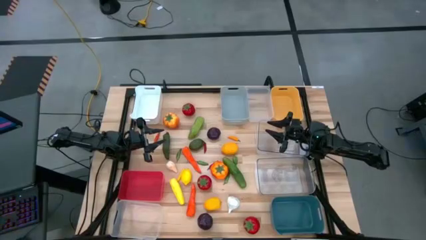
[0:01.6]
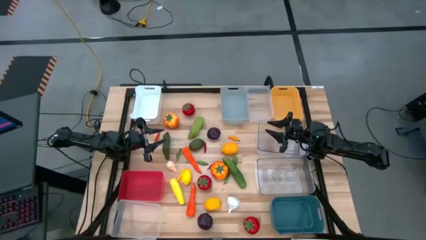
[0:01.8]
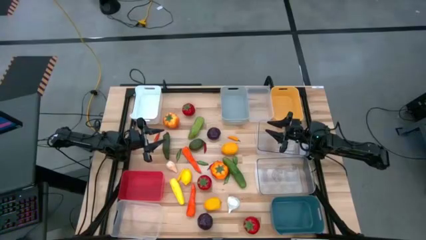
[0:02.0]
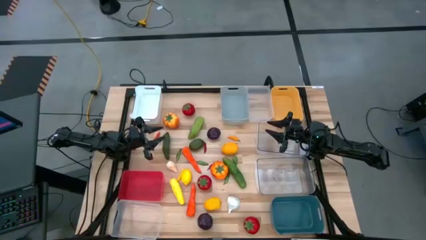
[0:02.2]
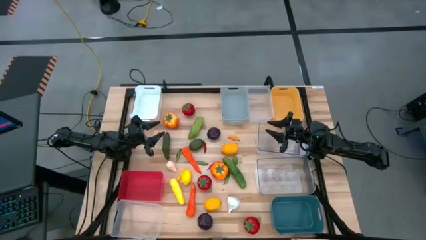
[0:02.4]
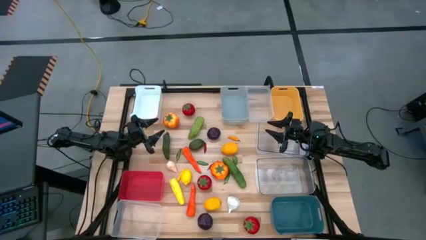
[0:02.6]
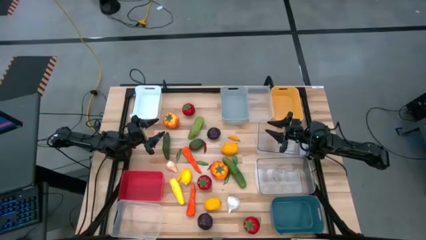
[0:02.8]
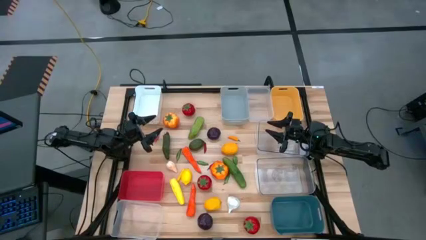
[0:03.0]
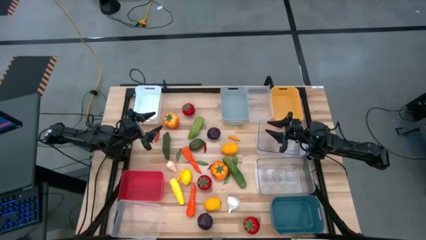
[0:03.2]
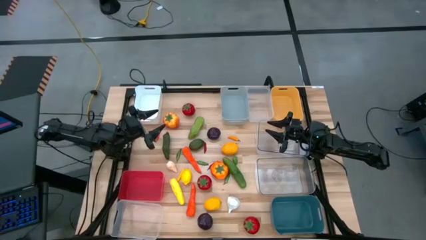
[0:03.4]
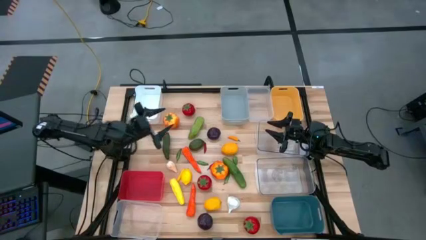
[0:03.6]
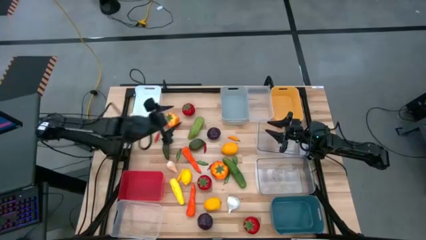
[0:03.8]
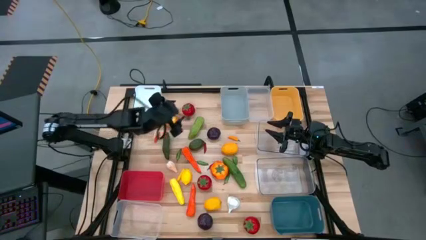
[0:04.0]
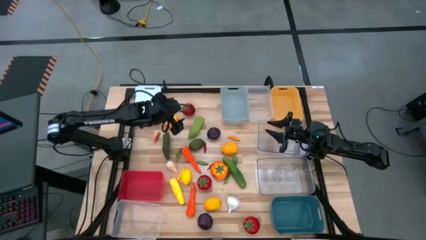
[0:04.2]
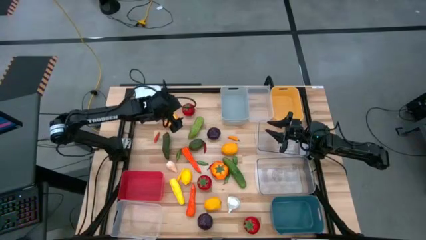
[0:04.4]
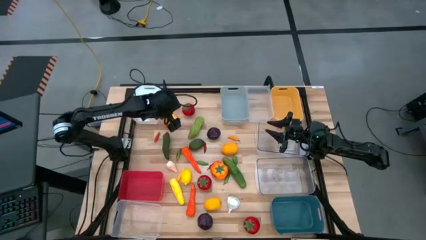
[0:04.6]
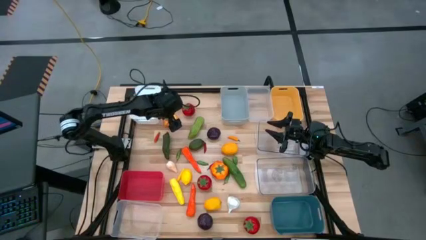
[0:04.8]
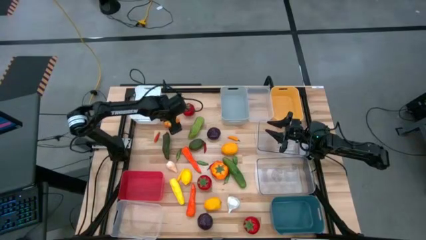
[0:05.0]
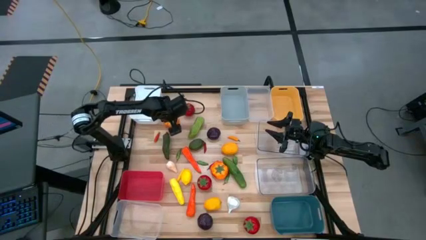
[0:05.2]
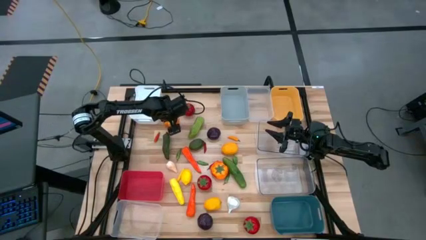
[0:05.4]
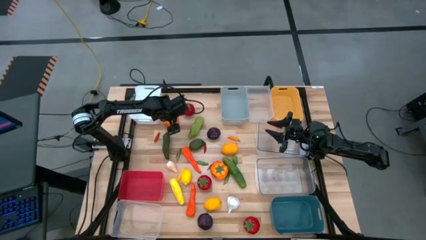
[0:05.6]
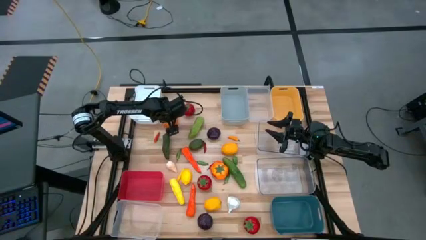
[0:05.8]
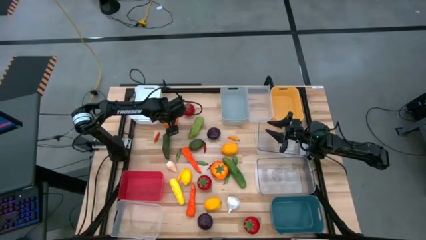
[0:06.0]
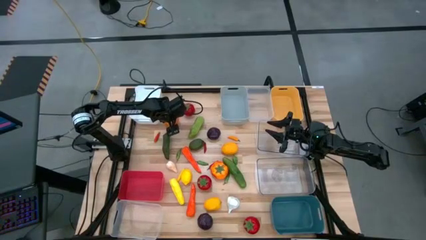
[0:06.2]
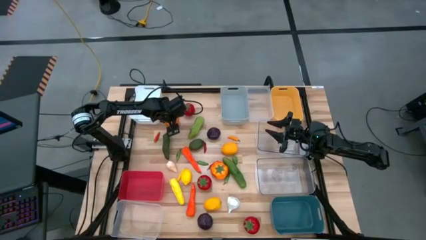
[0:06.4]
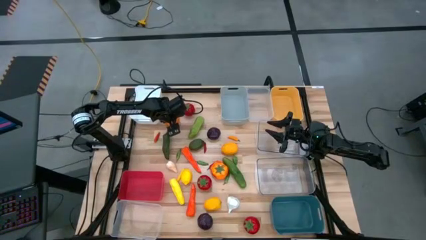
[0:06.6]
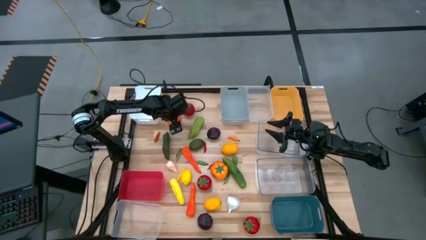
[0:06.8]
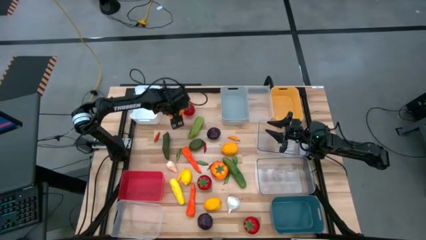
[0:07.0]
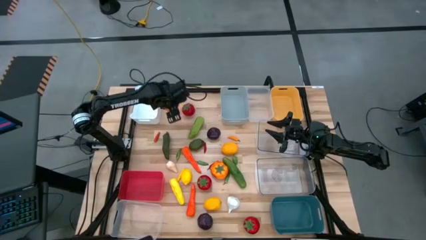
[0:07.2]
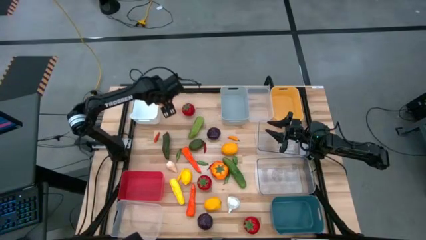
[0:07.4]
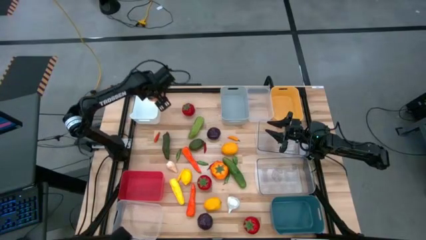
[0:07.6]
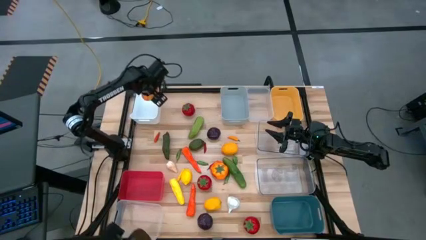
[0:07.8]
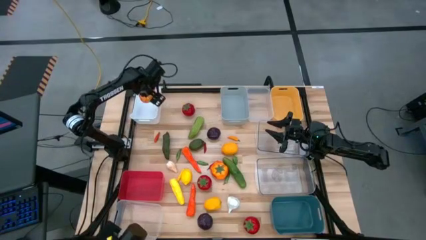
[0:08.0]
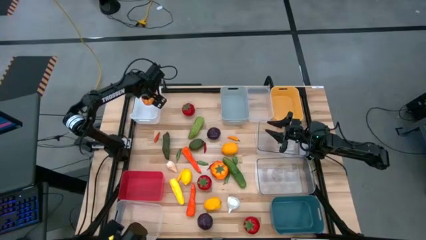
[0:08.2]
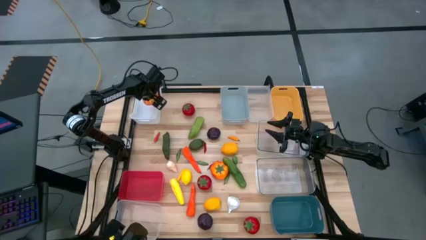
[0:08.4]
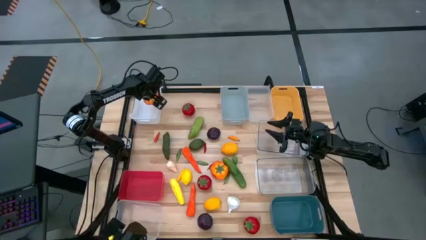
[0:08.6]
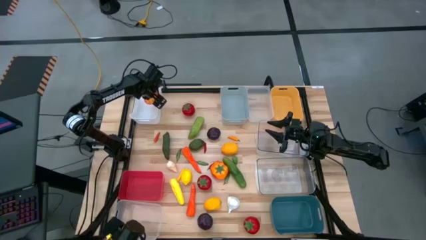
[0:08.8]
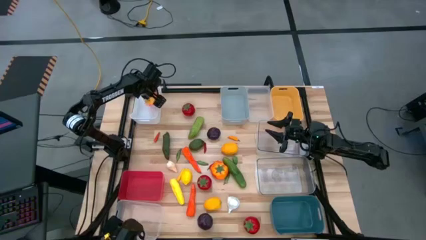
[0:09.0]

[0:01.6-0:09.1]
Task: Sort produce into baskets
Put the top pumpkin into the white bin

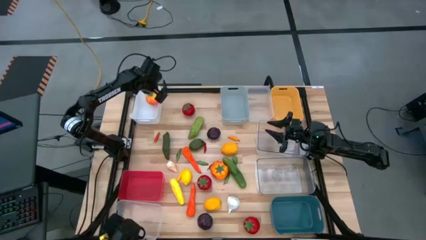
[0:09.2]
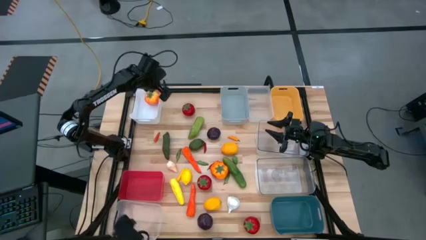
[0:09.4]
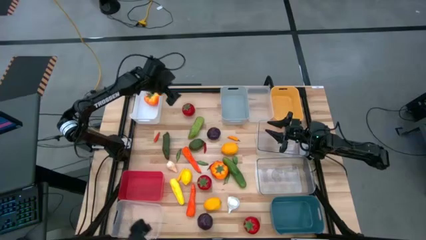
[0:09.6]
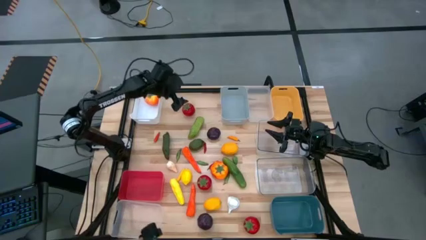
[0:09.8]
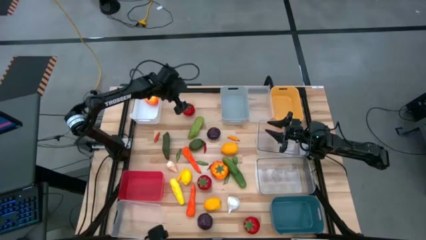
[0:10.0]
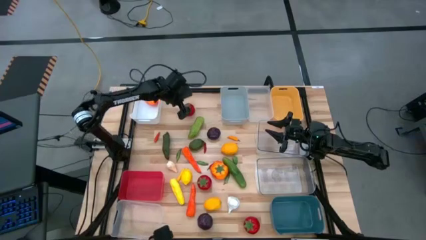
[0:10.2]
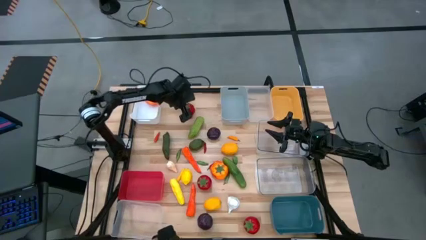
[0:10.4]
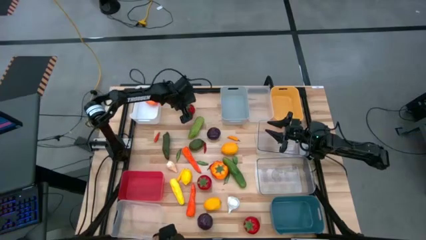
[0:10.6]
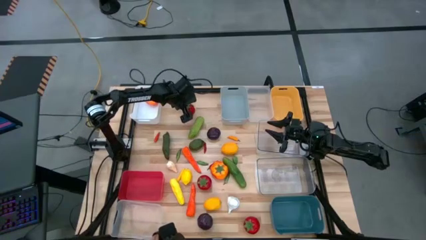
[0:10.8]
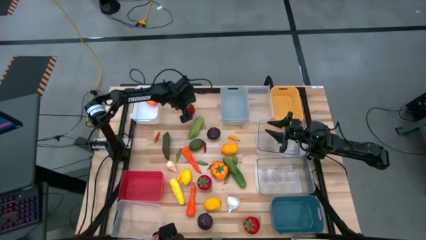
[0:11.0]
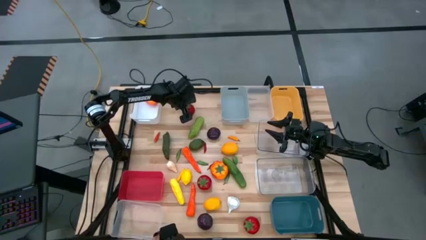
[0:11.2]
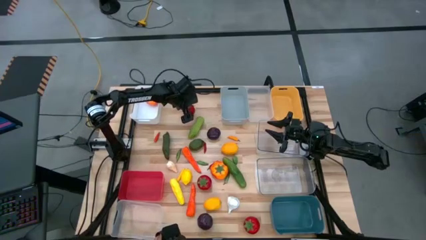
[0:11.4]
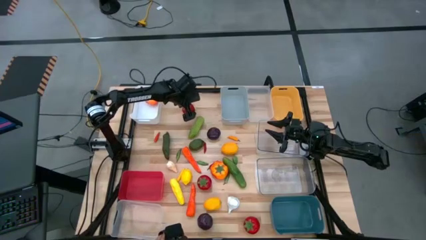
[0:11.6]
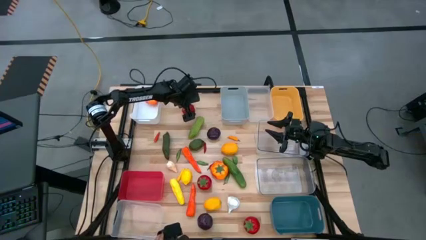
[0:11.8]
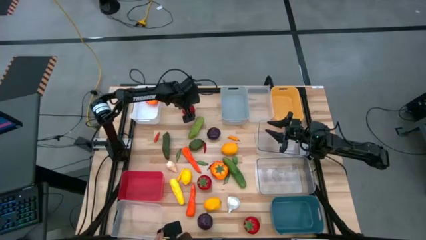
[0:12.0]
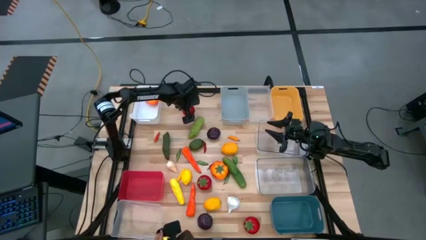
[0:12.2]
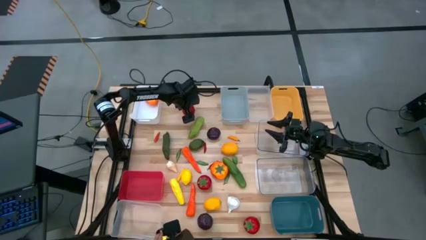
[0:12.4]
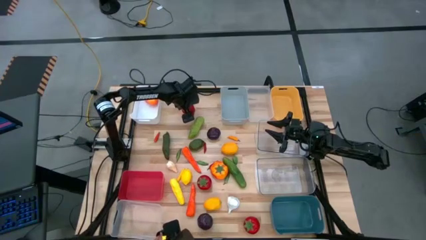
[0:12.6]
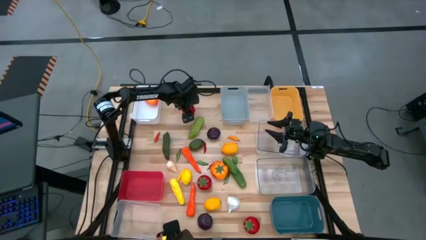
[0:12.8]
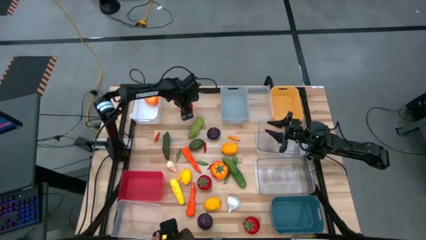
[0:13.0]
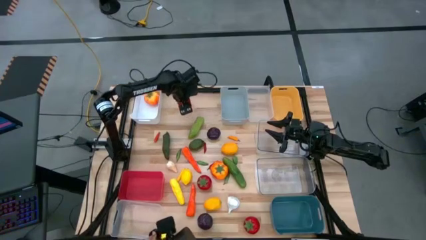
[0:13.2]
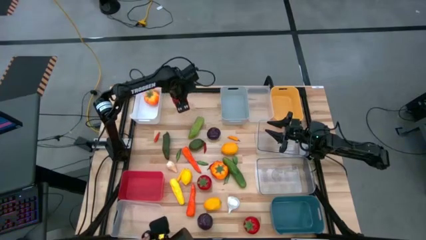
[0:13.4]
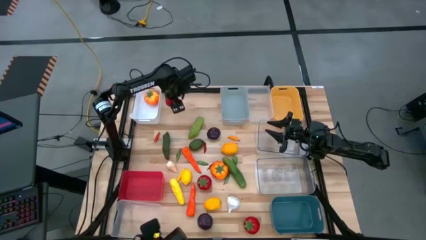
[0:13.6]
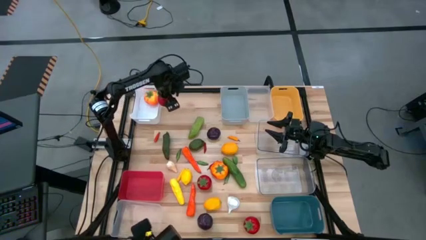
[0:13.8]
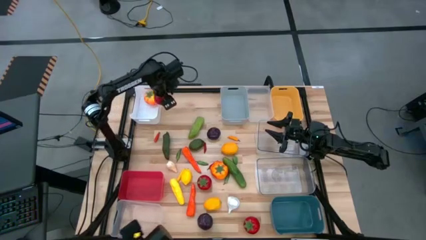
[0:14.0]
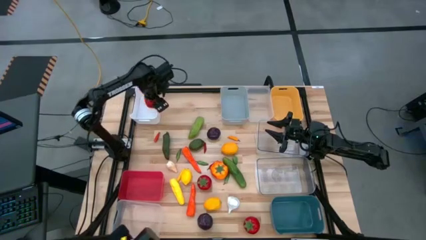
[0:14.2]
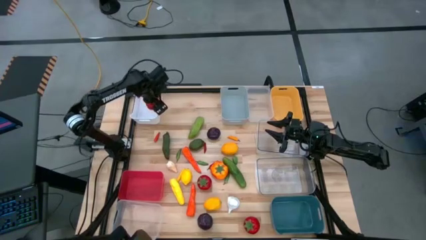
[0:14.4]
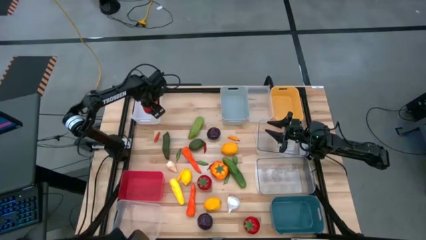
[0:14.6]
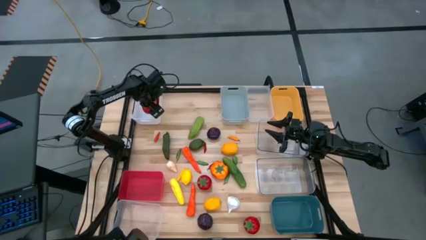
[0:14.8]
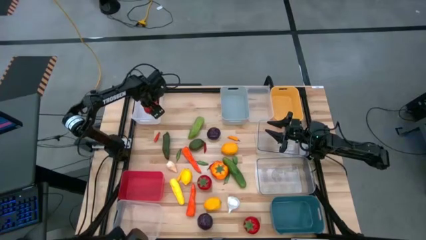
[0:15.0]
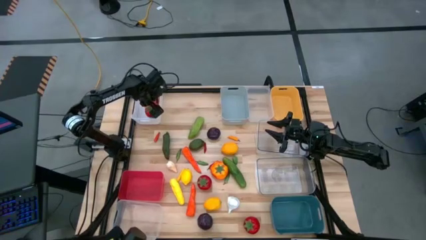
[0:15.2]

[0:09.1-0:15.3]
Put the top red tomato into the white bin

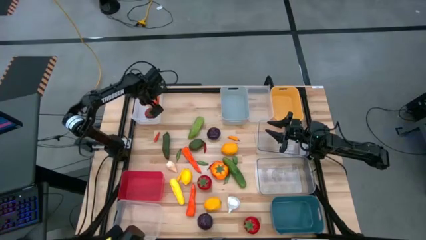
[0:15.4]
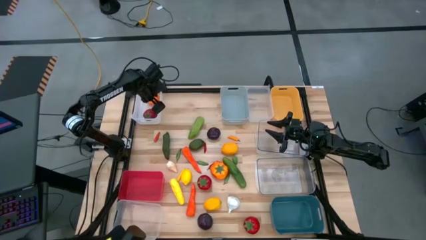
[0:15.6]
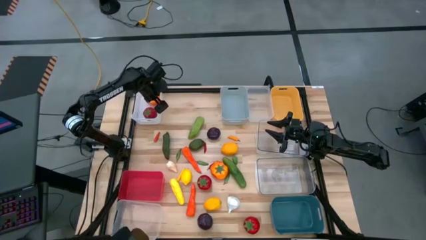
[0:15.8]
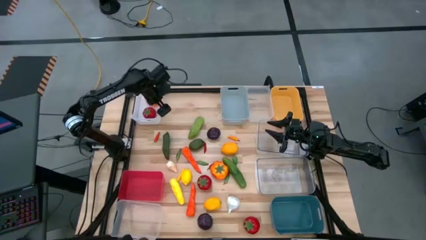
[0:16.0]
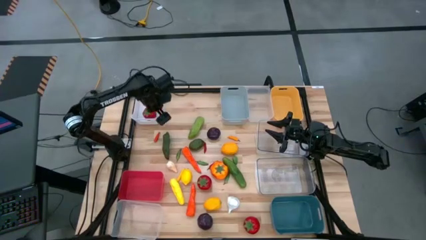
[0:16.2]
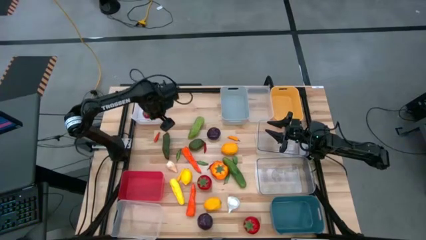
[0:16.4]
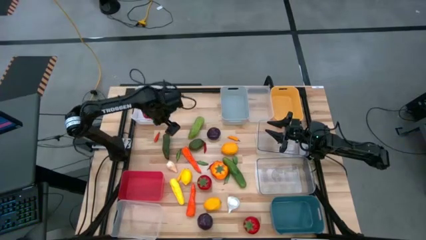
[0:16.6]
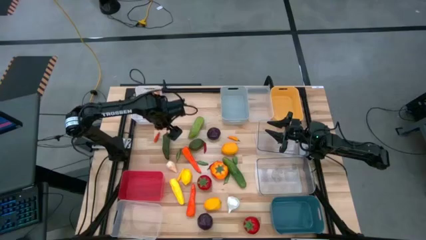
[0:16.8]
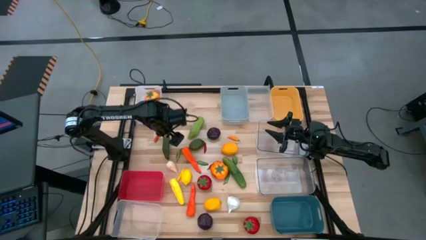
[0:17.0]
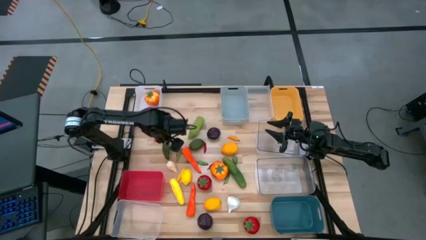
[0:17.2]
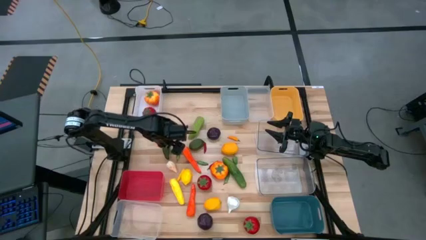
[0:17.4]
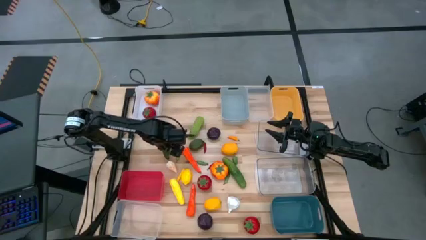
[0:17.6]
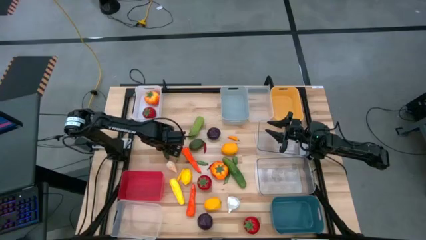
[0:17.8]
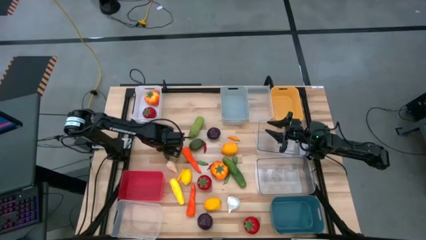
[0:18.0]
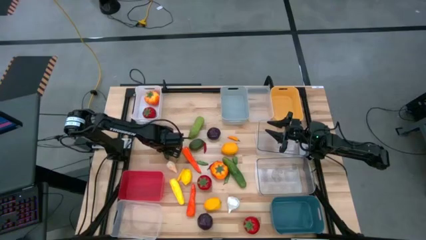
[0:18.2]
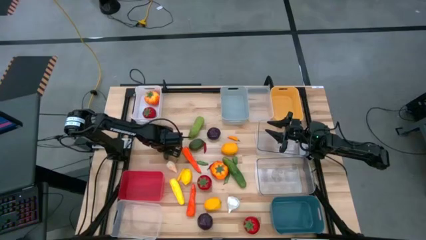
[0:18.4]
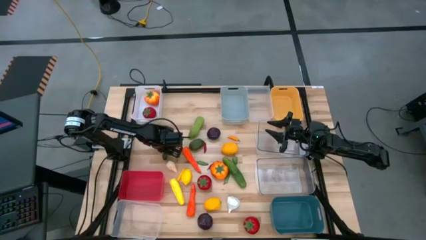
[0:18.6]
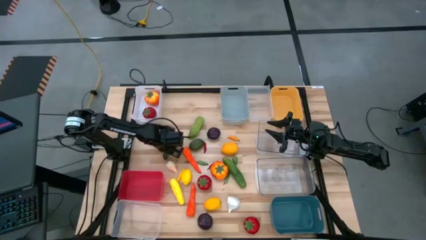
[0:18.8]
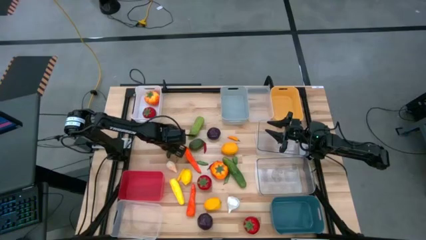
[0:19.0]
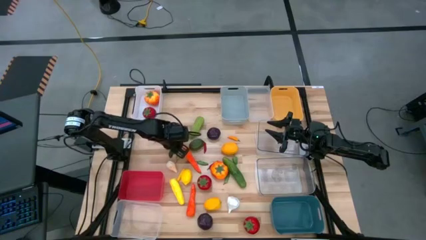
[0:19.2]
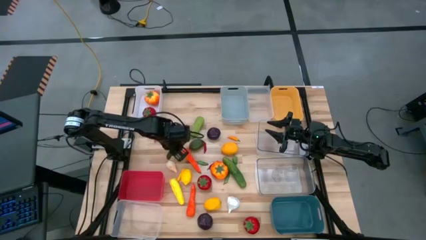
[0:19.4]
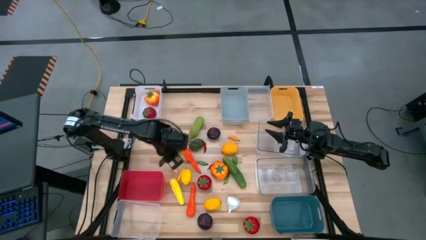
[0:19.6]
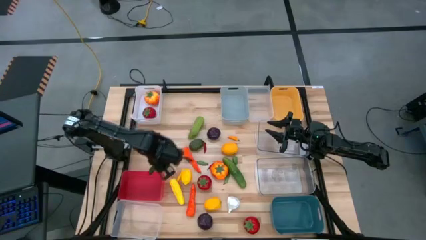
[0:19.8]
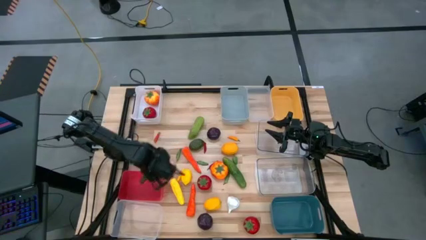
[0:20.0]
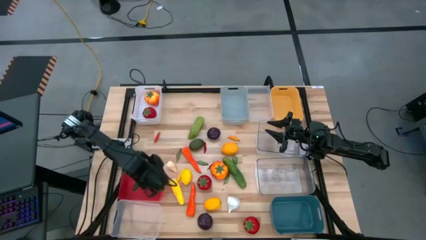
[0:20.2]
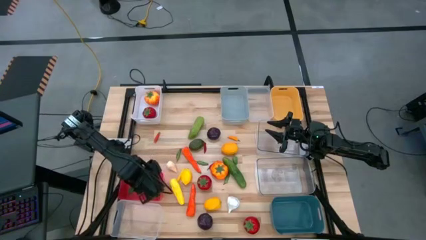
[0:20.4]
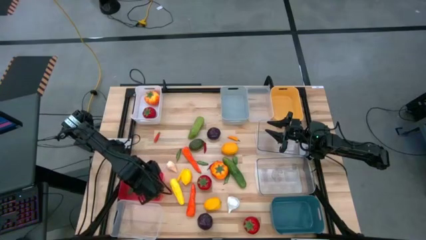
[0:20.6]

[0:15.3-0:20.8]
Put the big green chili pepper into the red bin
